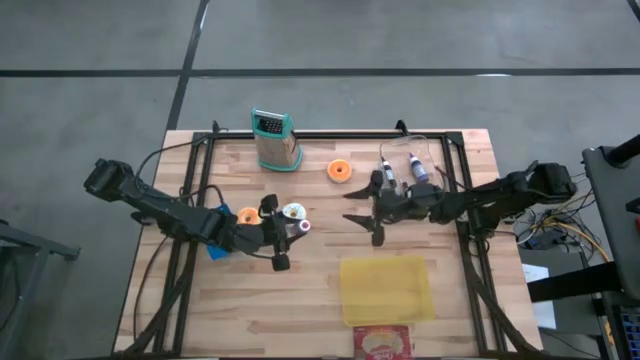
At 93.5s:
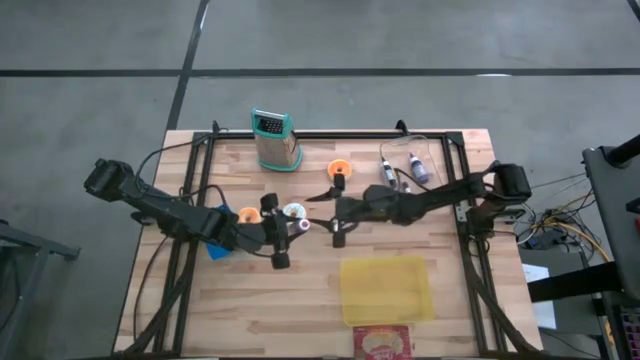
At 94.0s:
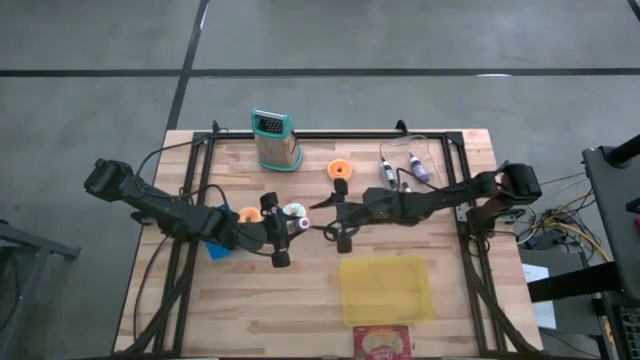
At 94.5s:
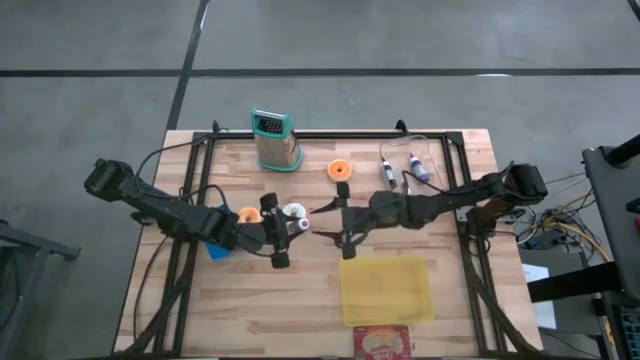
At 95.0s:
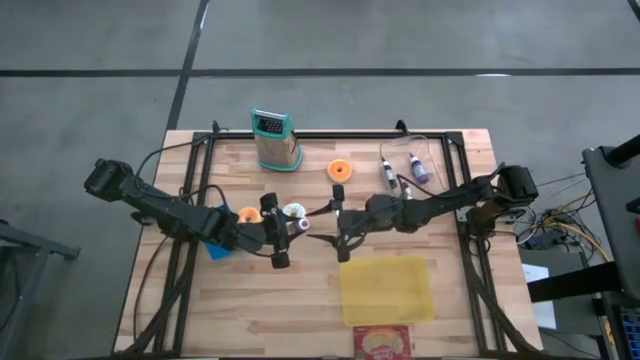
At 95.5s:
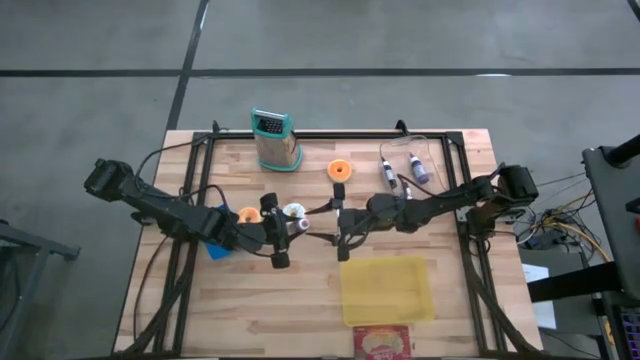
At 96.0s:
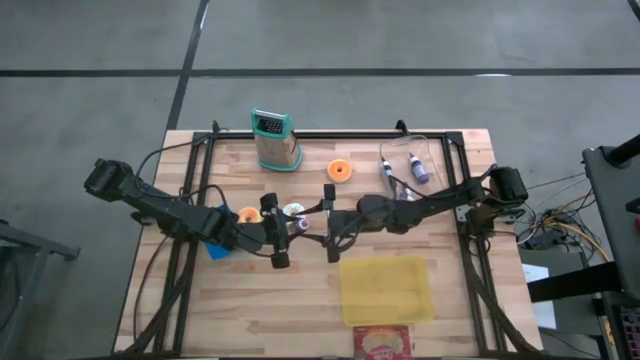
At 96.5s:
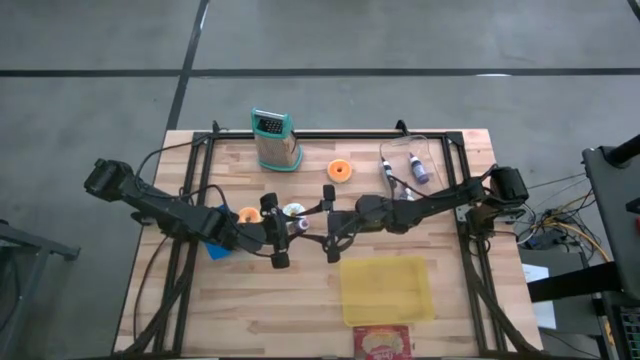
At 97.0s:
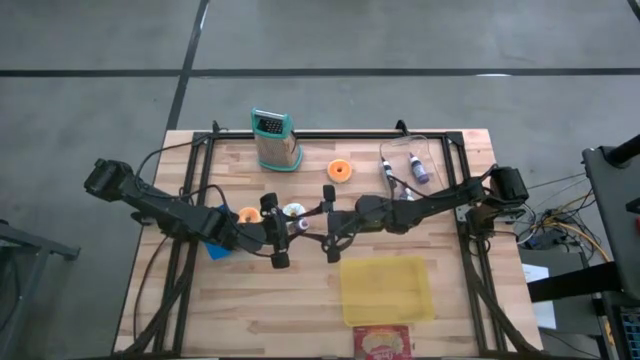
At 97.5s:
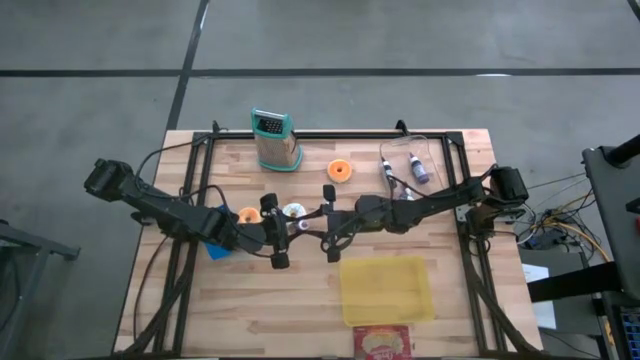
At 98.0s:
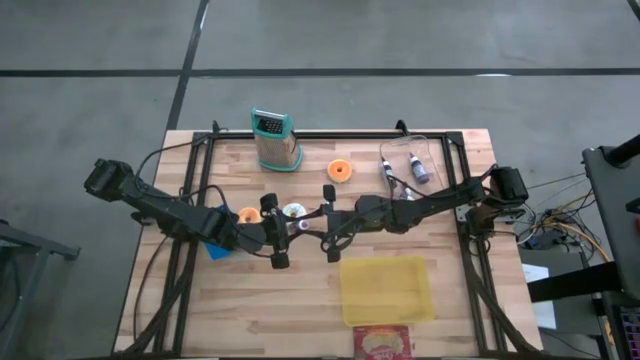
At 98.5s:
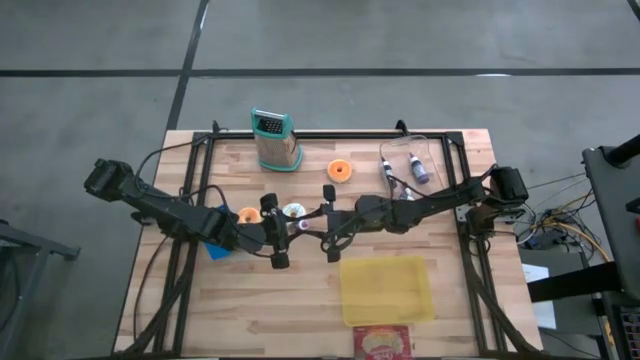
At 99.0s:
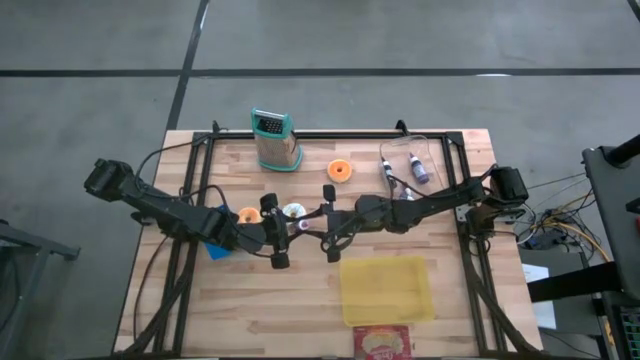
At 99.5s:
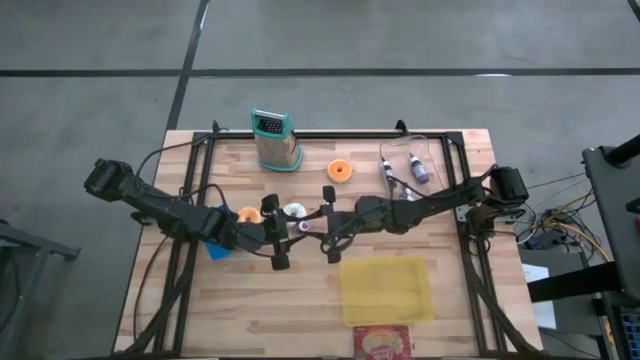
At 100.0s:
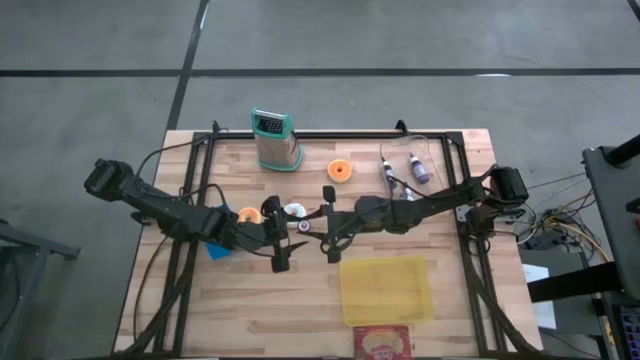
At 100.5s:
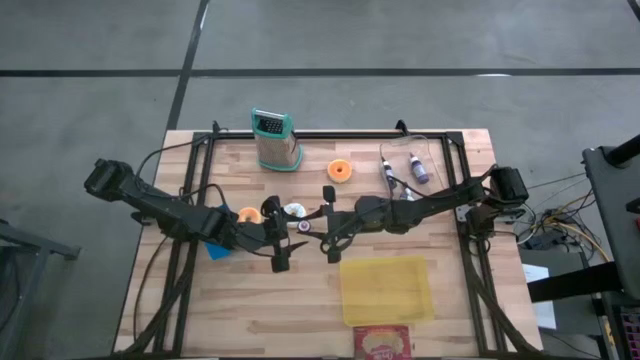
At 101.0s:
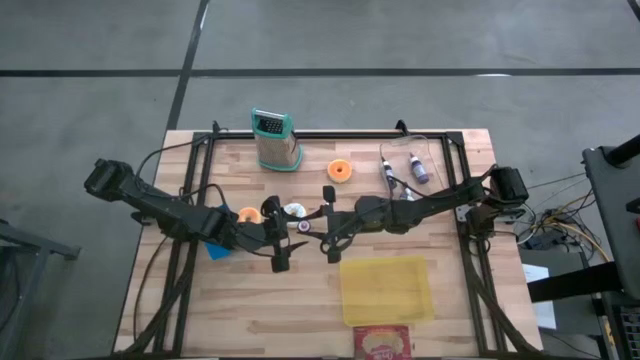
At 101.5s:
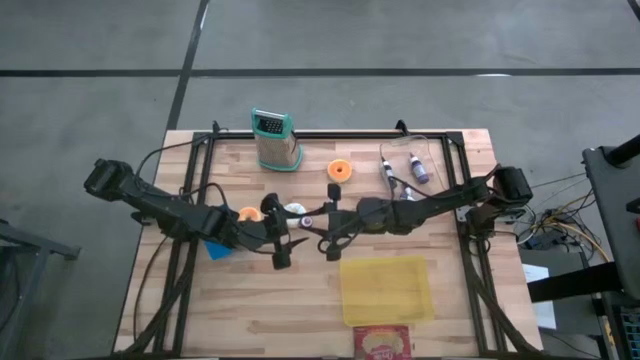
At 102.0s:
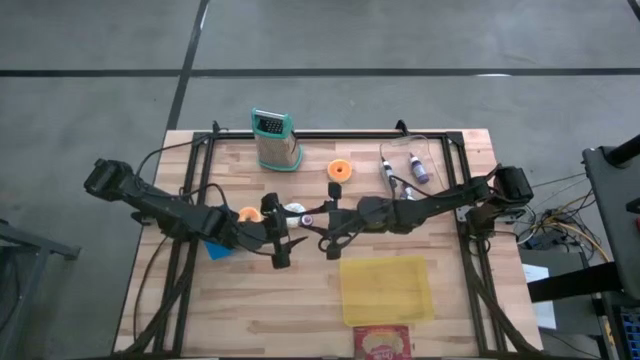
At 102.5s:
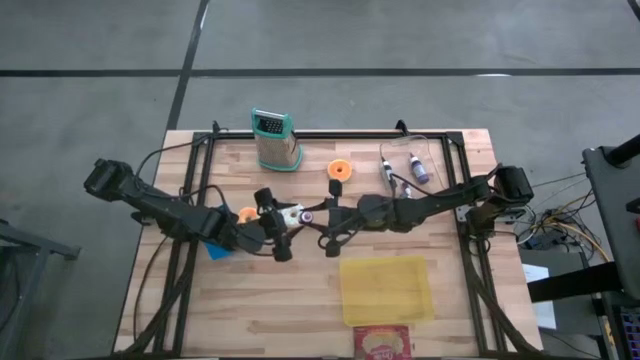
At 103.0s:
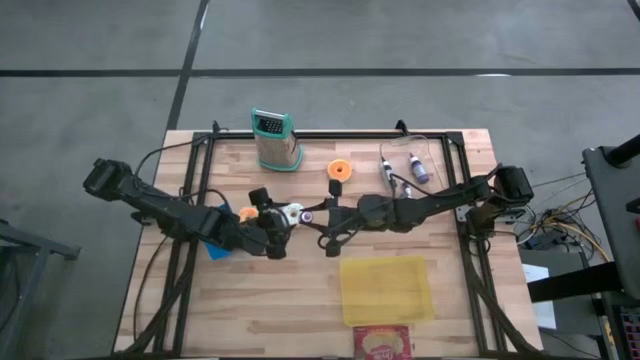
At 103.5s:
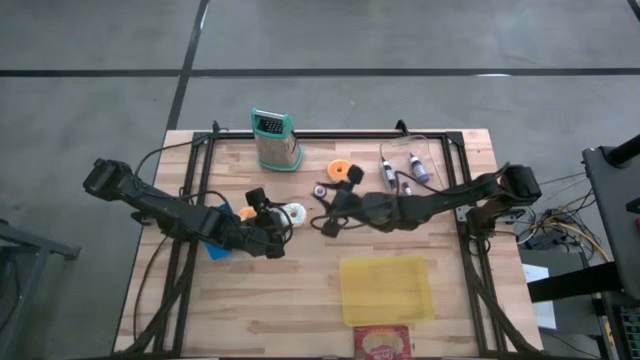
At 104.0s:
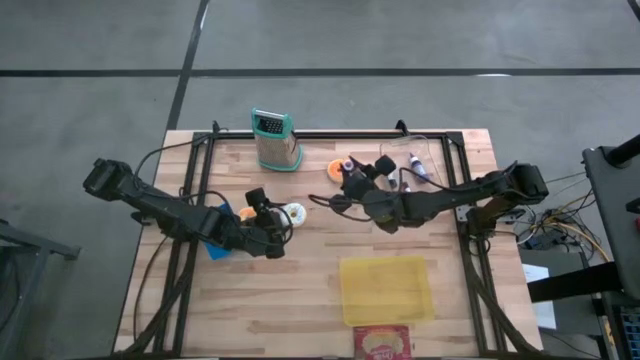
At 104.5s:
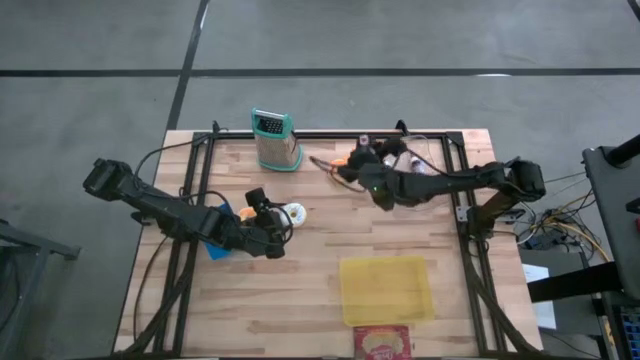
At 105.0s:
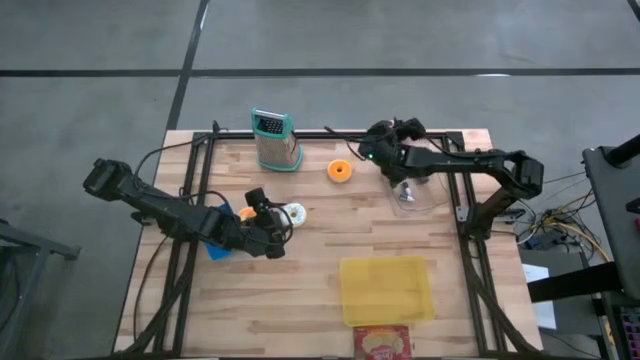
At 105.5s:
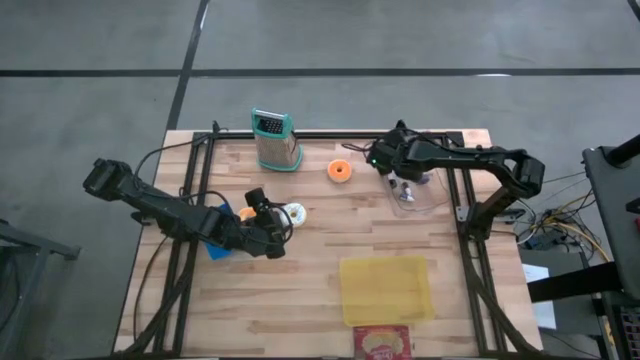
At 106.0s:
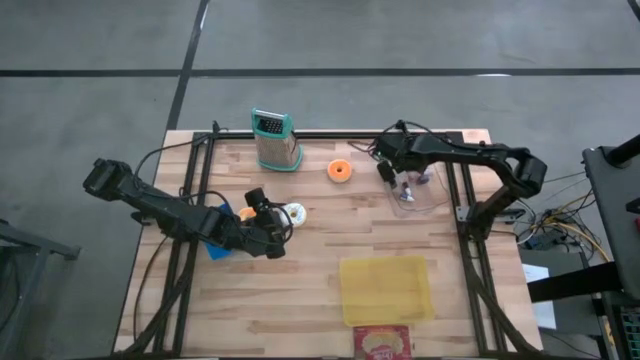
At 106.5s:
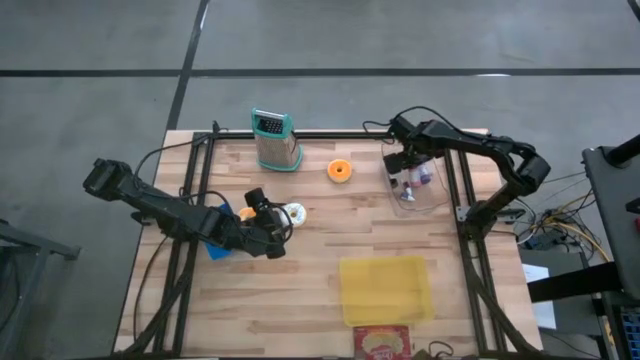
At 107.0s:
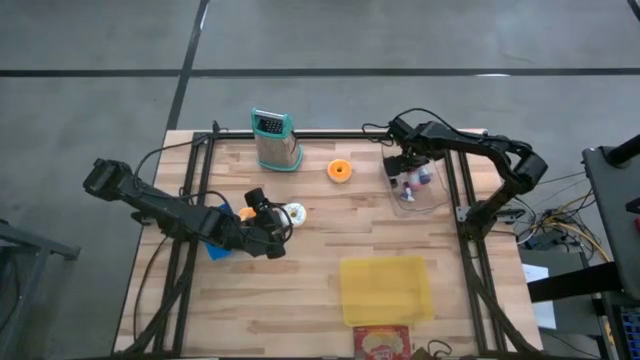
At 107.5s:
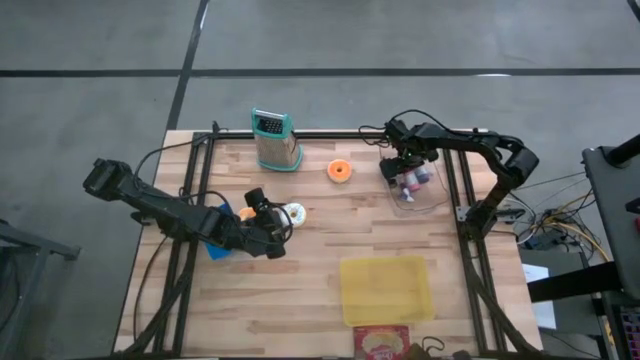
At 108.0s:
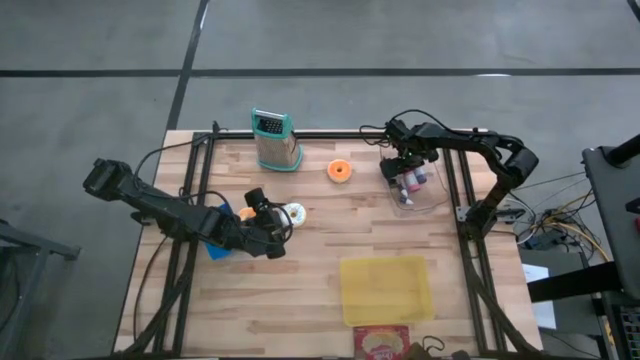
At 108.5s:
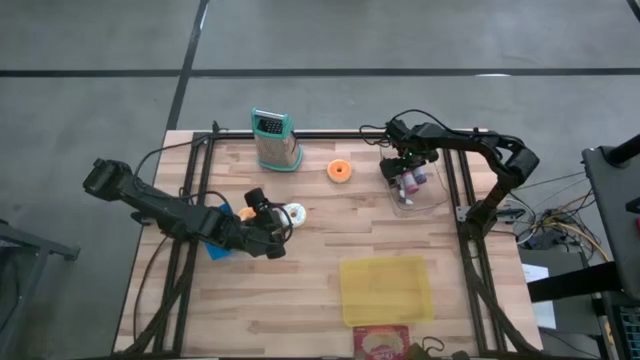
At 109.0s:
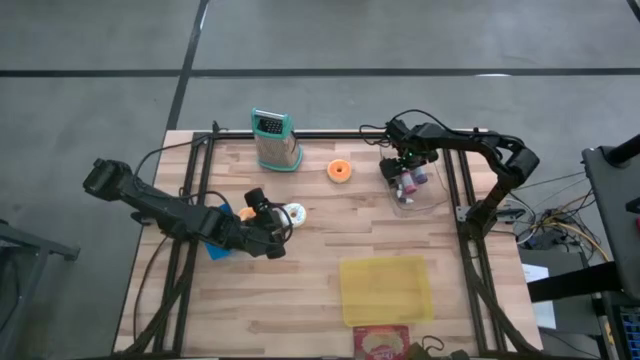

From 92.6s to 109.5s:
Task: Pick & Place Food Item
Put the pink food coloring bottle into the transparent bin

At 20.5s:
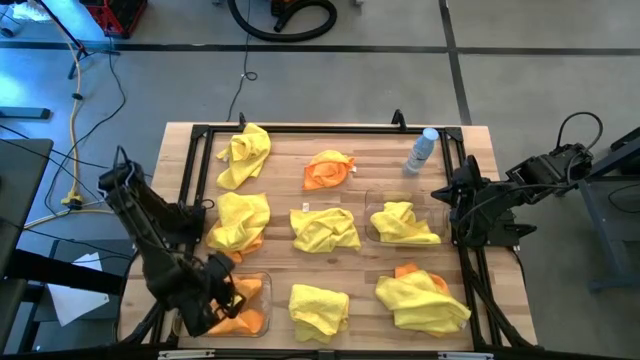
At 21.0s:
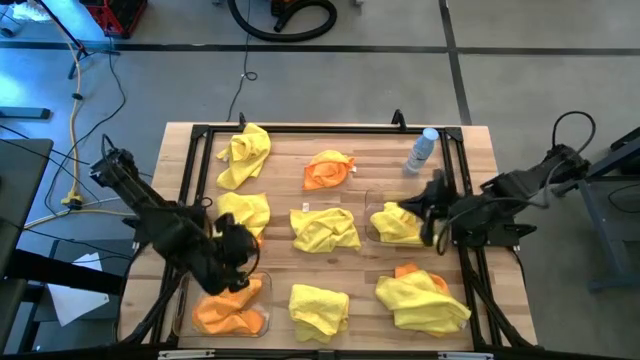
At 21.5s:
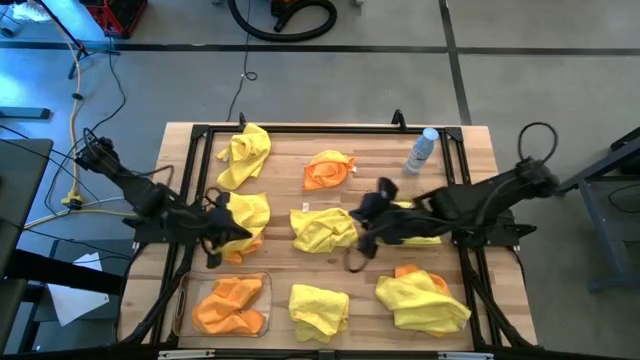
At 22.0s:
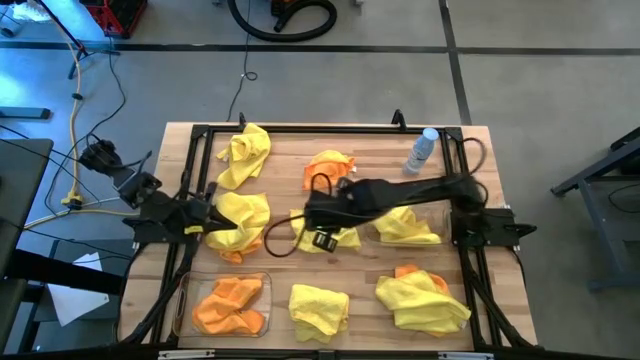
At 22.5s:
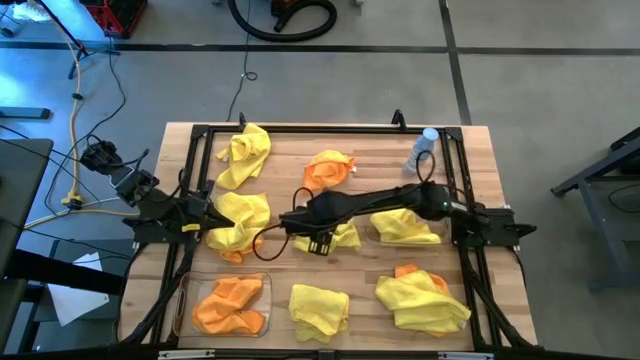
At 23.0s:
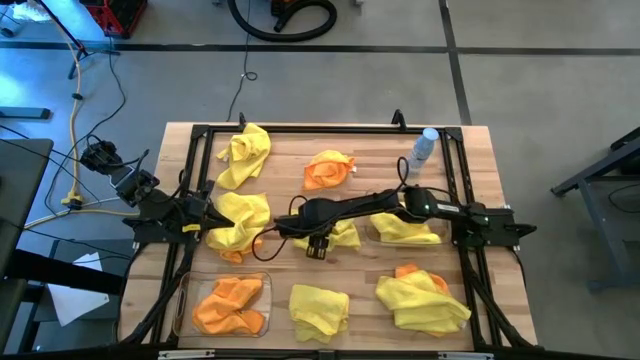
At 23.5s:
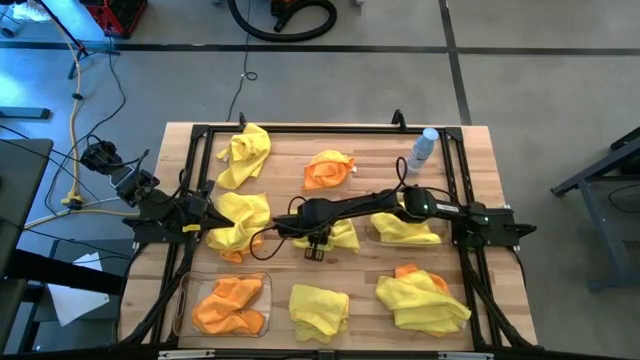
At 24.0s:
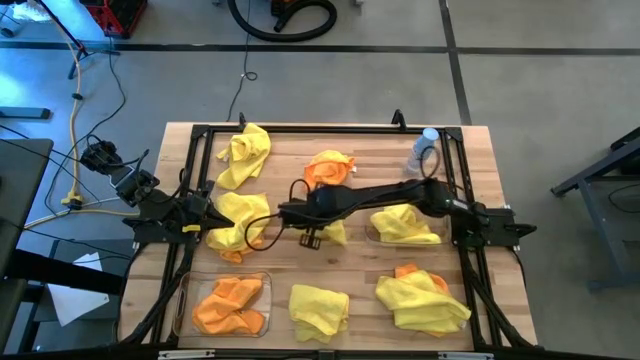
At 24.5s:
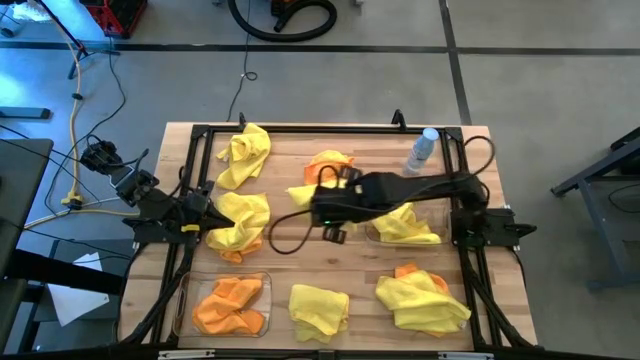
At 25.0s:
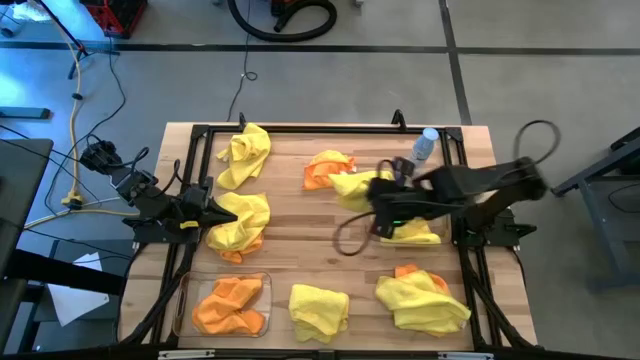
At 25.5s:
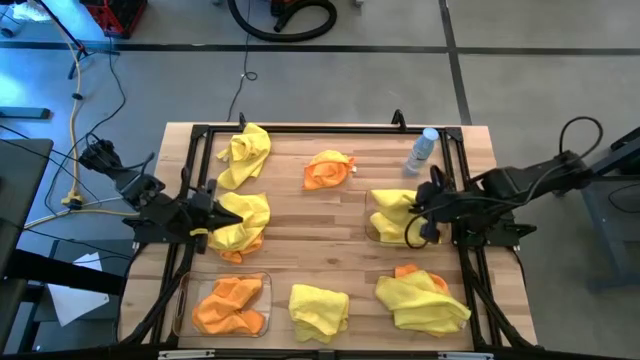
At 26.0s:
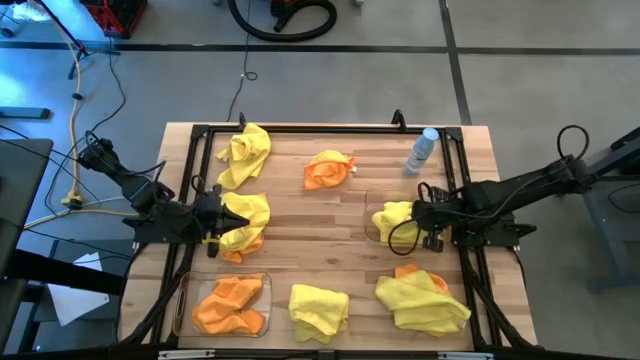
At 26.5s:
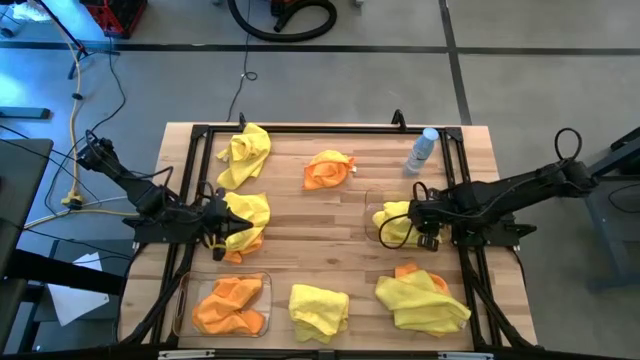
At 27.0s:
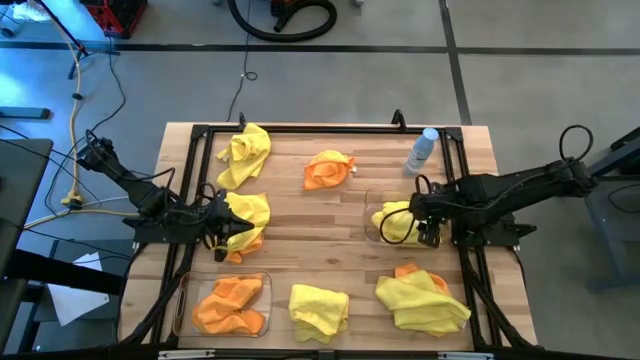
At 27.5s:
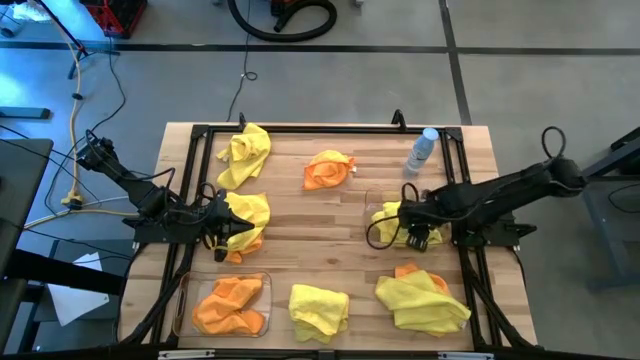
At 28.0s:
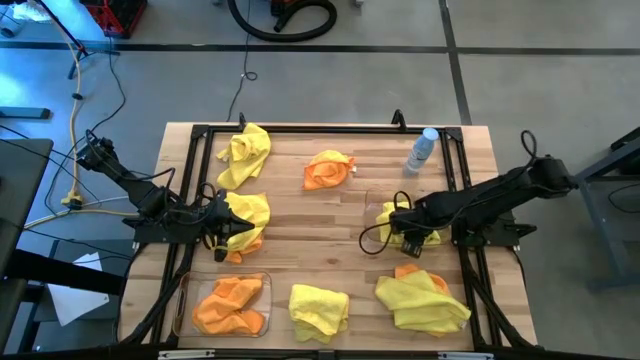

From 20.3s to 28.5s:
Task: Sort microfiber towel by color & place in baskets
Put the yellow microfiber cloth into the right transparent bin
